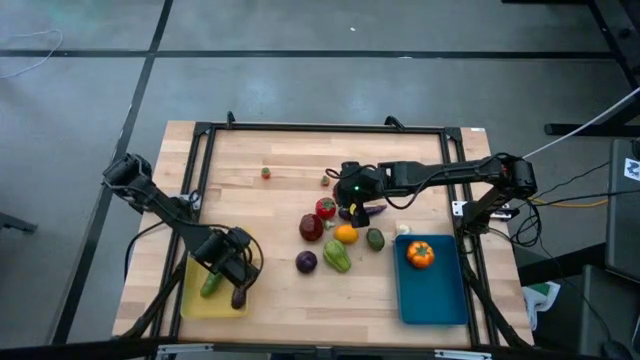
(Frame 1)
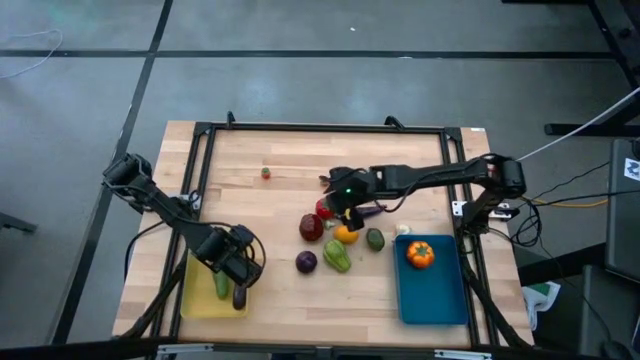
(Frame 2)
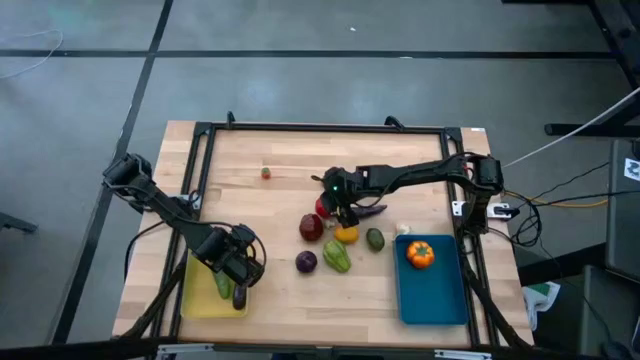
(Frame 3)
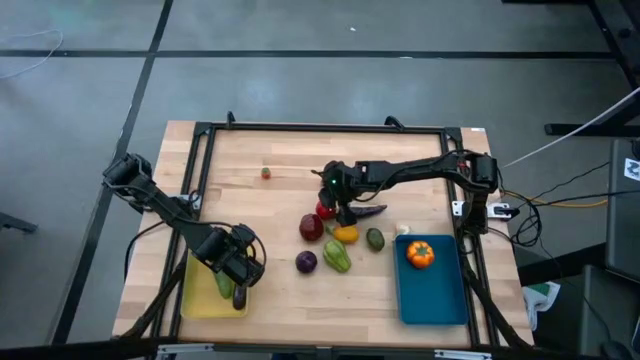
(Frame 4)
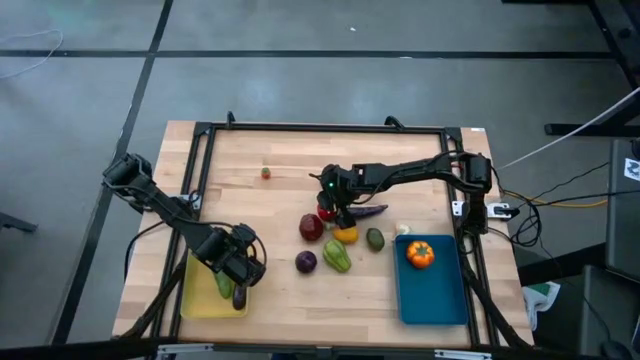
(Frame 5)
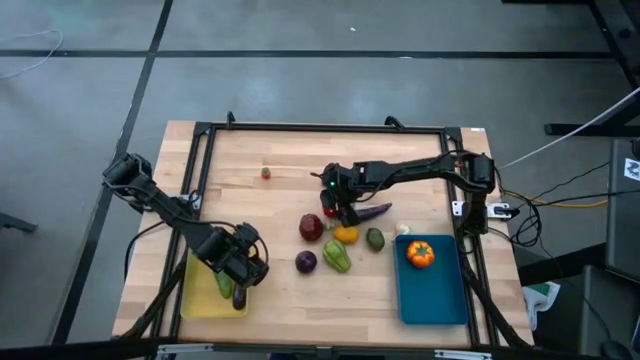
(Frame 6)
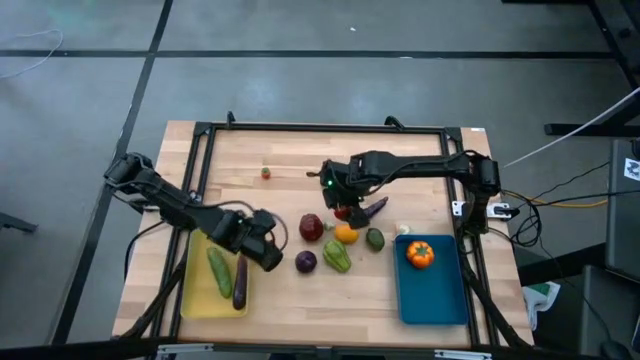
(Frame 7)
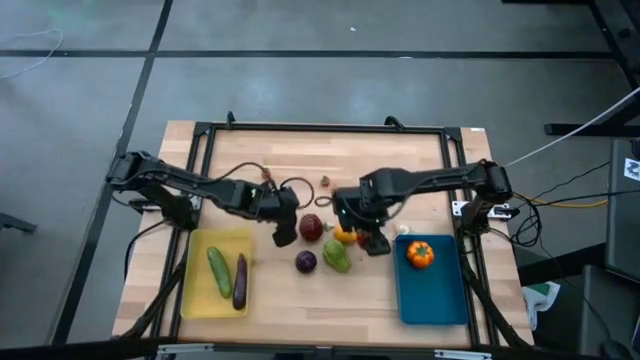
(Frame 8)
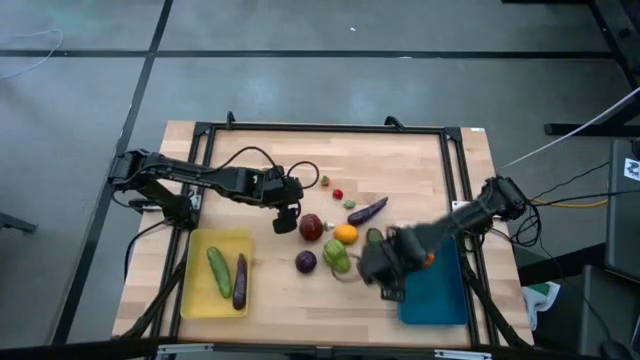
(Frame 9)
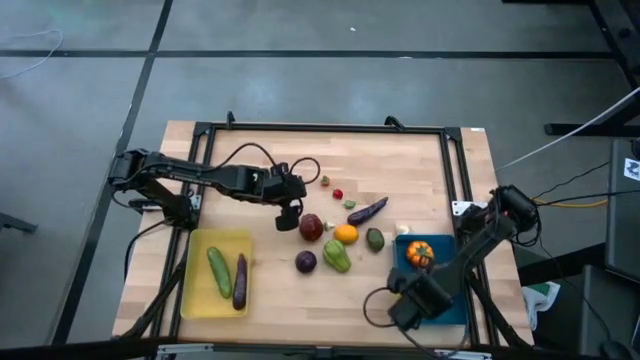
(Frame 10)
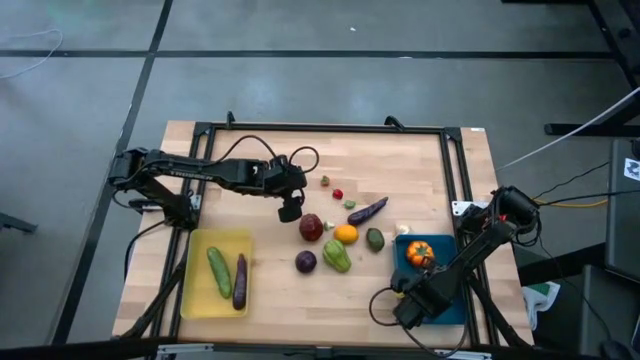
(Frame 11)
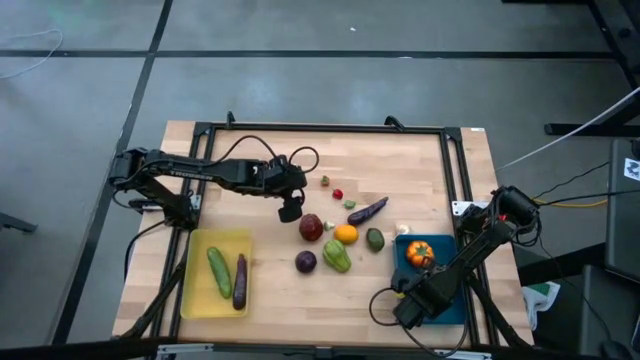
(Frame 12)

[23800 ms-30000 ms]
Task: Sort produce into baskets
Put the red tomato into the blue bin

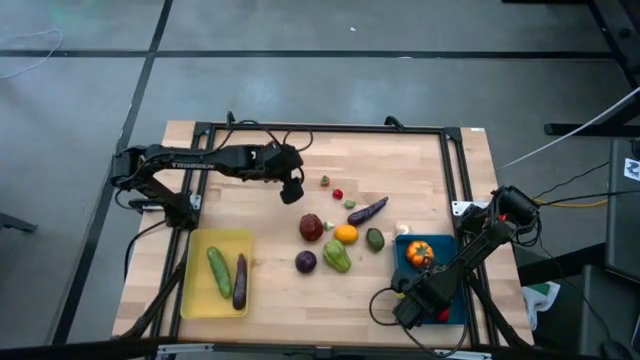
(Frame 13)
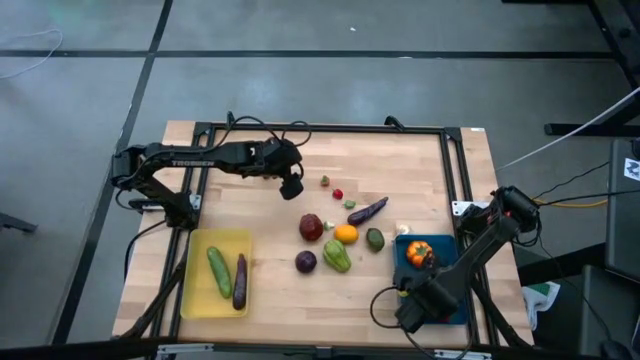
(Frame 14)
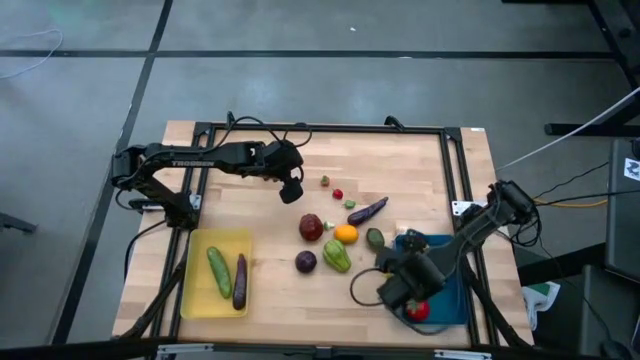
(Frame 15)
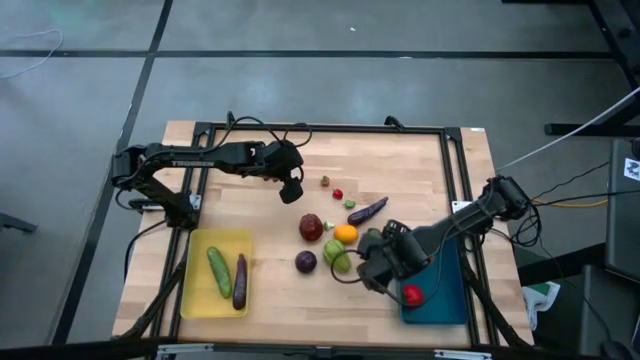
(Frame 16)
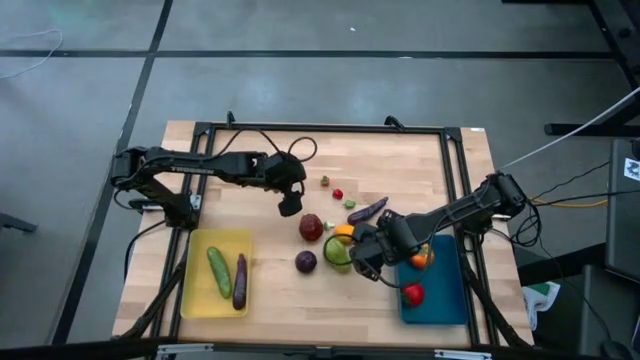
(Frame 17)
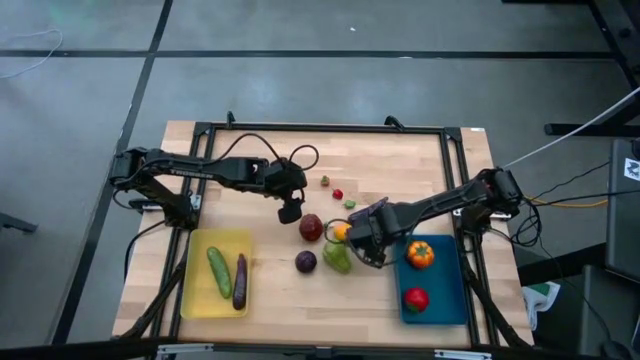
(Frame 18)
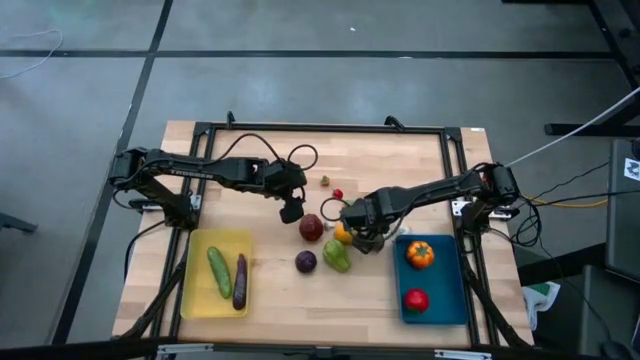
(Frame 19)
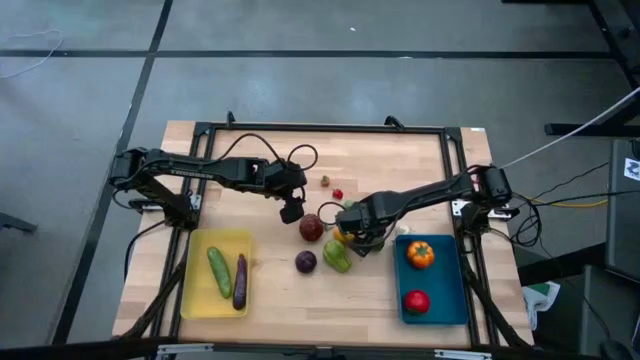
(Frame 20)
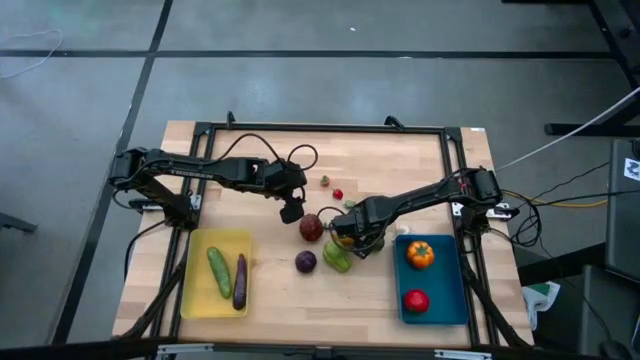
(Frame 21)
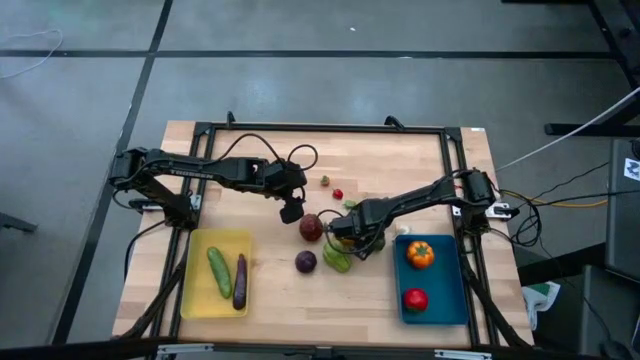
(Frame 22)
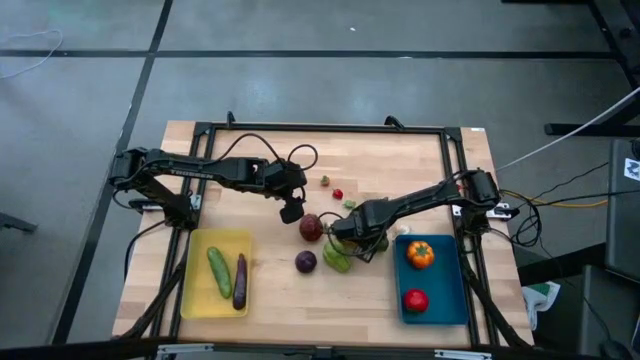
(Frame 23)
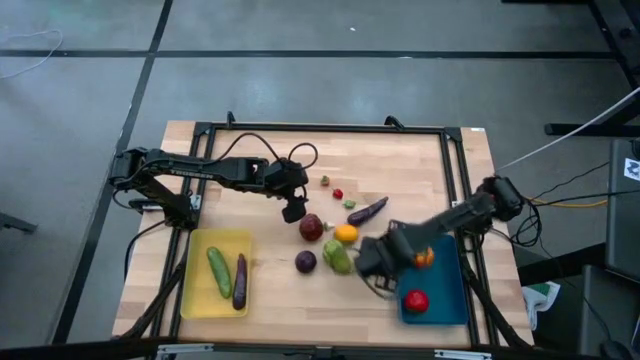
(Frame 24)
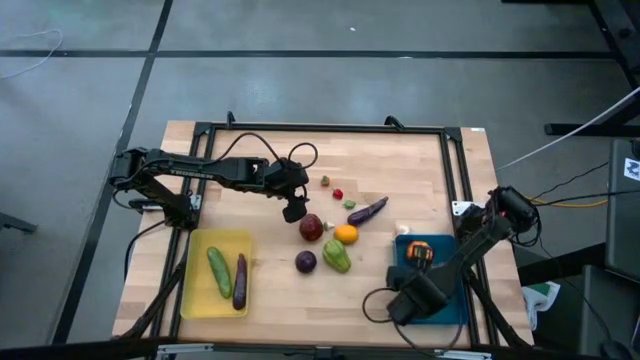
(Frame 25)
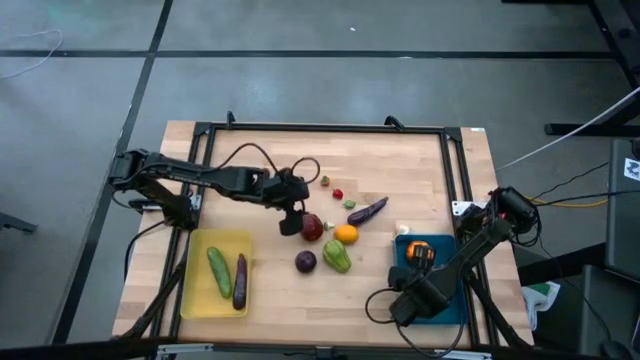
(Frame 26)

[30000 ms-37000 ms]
Put the green lemon into the blue bin

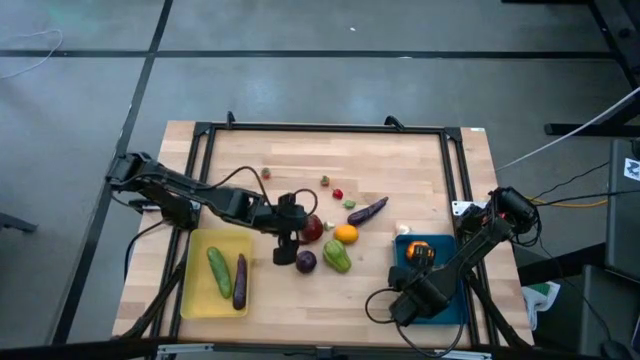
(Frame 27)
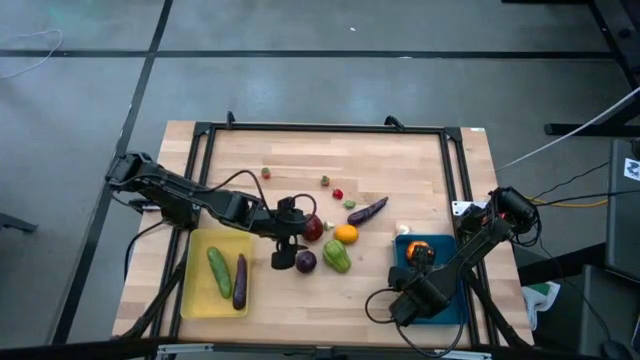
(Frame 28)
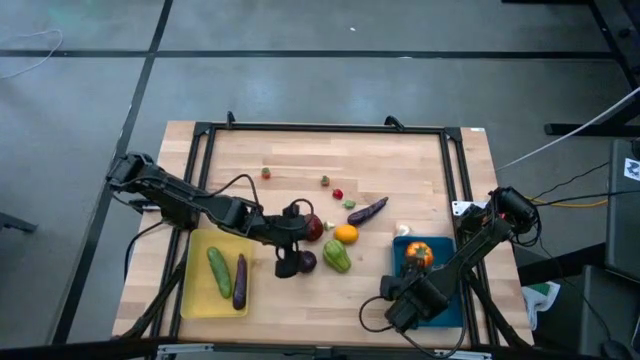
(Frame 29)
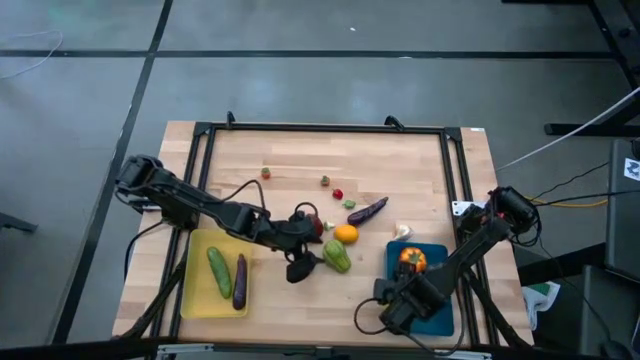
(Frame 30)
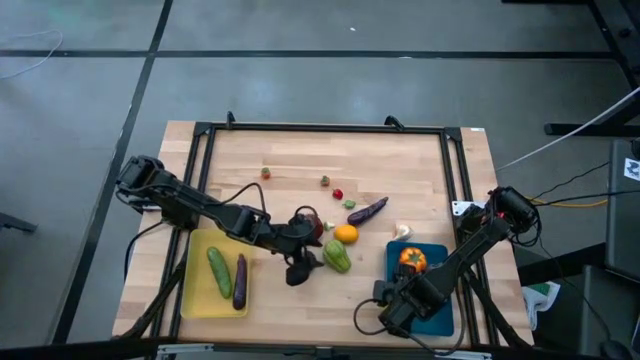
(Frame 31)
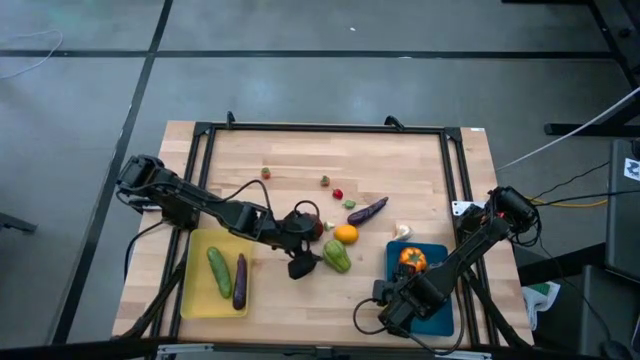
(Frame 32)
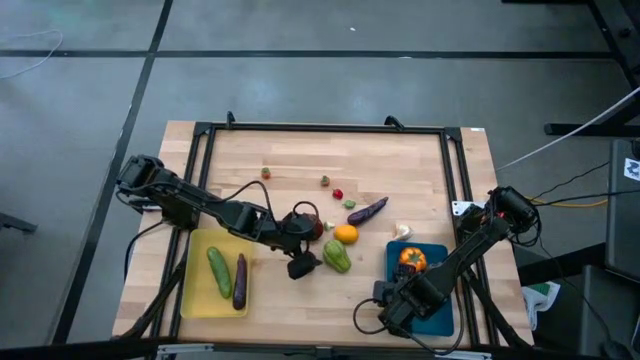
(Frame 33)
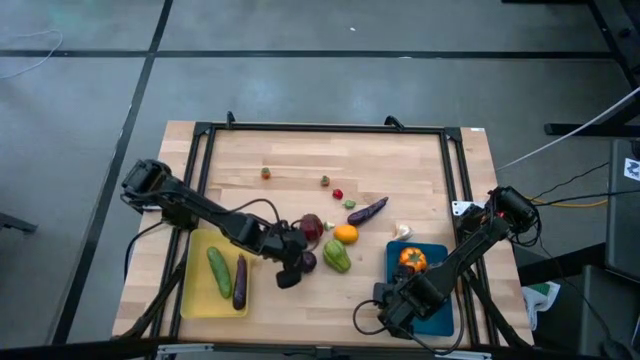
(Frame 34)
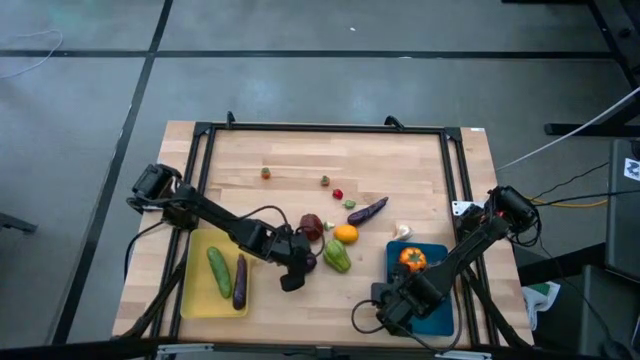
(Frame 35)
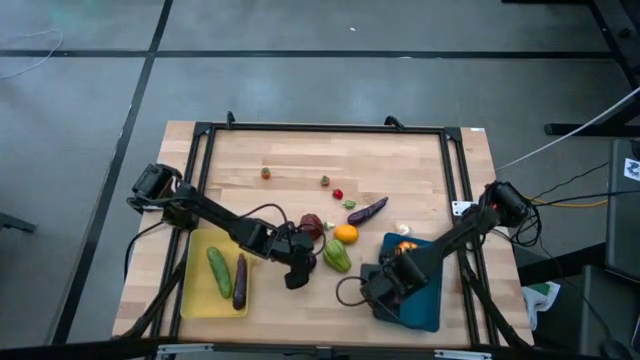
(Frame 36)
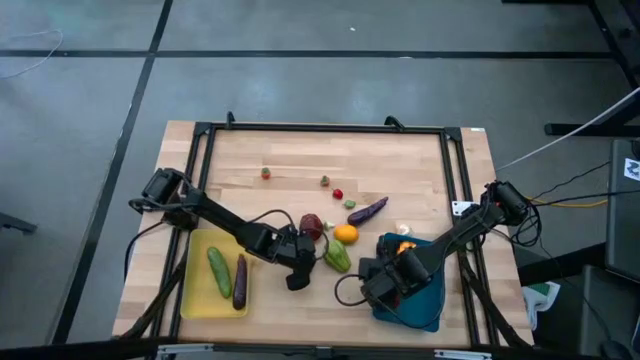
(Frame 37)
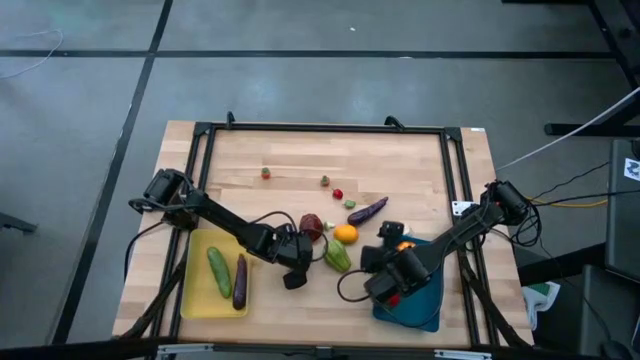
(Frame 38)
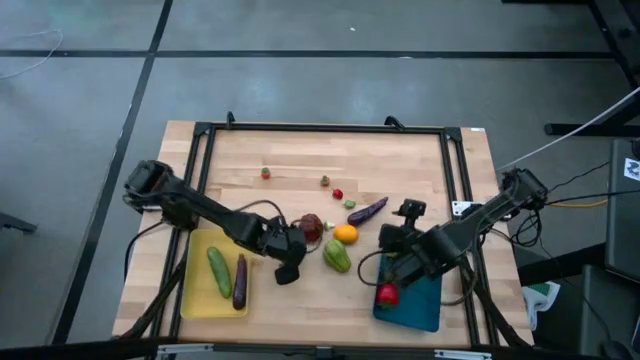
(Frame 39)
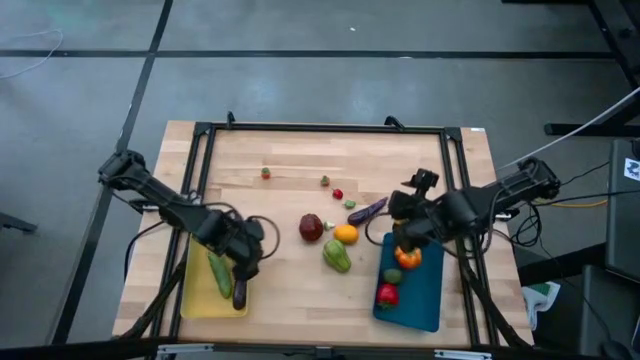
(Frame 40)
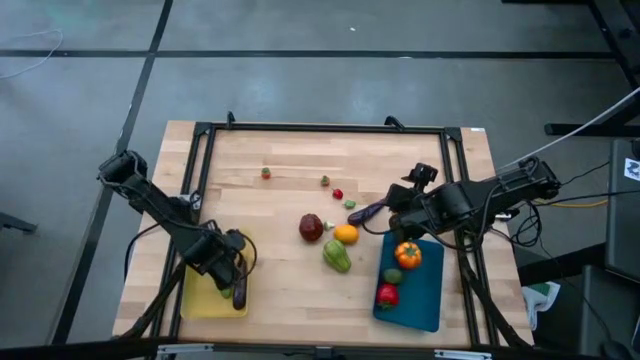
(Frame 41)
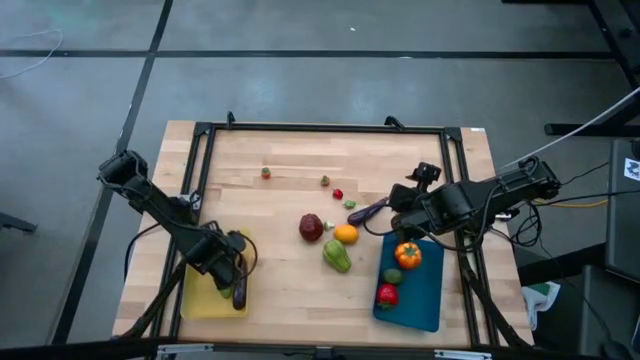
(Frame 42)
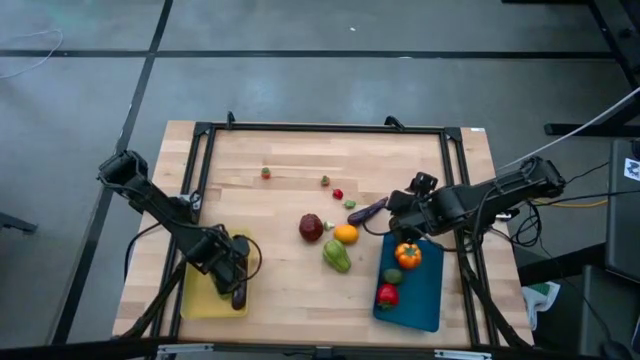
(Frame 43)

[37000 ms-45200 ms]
Put the violet onion into the yellow bin

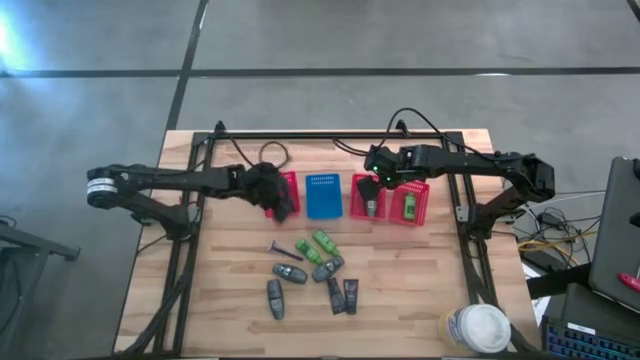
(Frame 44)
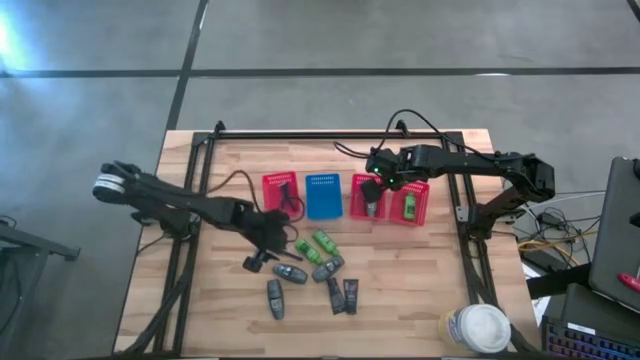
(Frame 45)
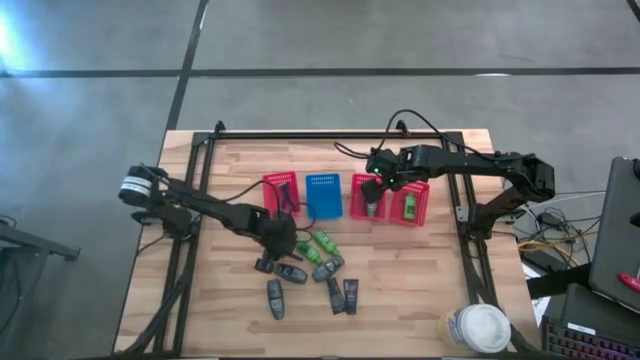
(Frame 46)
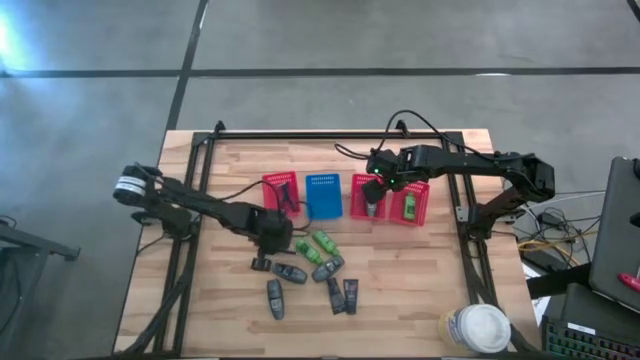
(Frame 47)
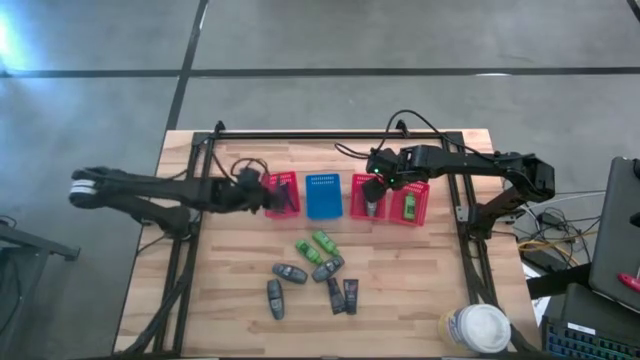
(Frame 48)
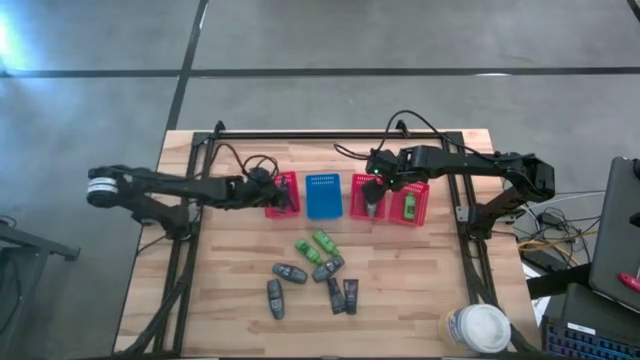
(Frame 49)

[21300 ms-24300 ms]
Task: Pick & Place Travel size toiletries
Put the blue razor into the left red bin
